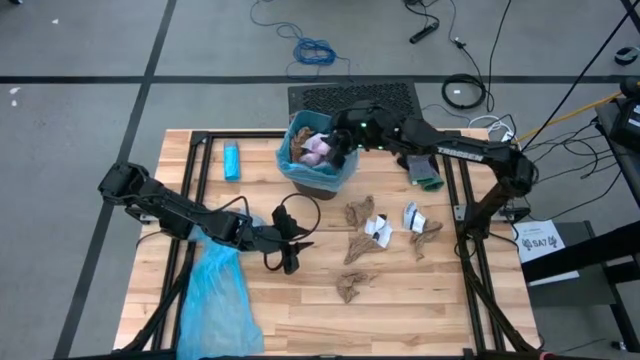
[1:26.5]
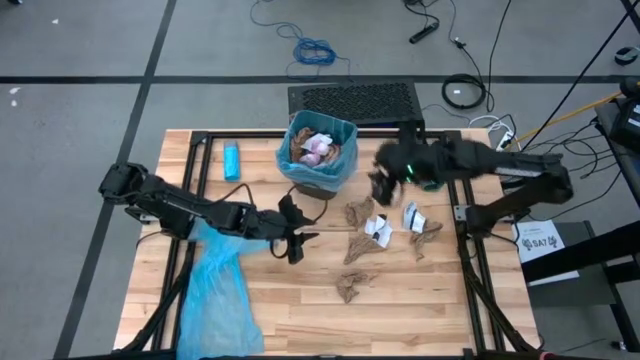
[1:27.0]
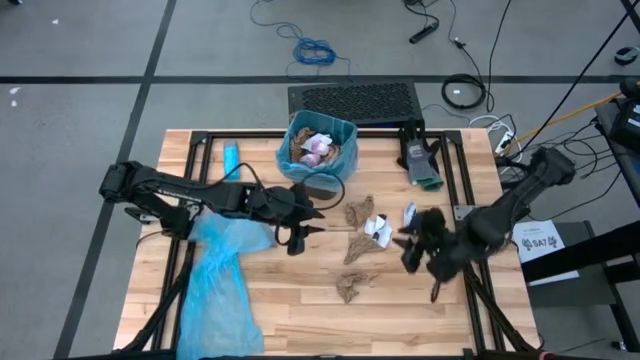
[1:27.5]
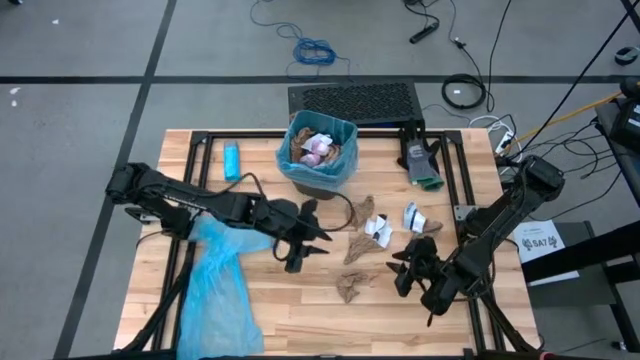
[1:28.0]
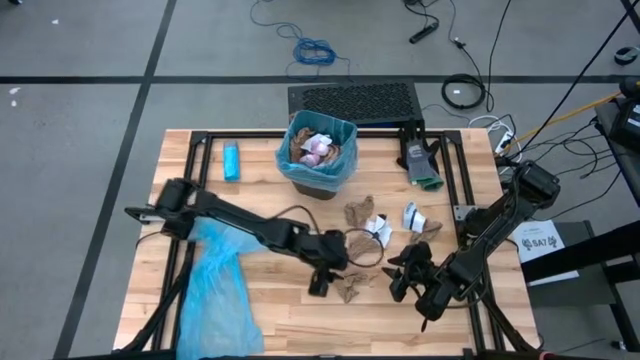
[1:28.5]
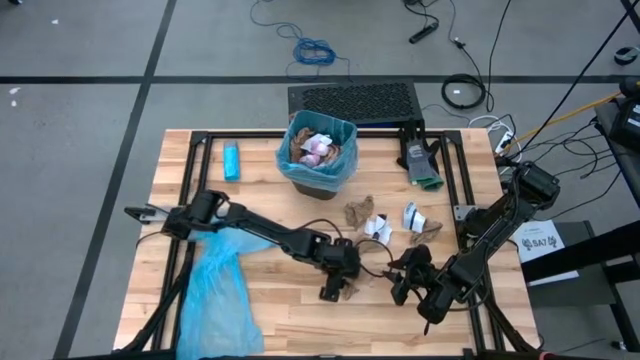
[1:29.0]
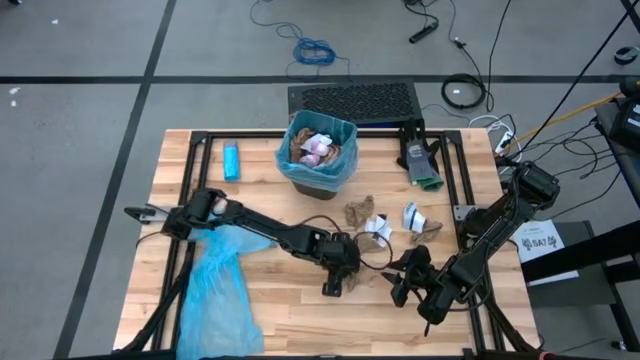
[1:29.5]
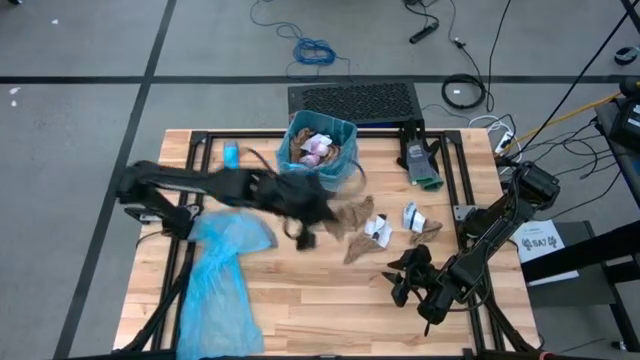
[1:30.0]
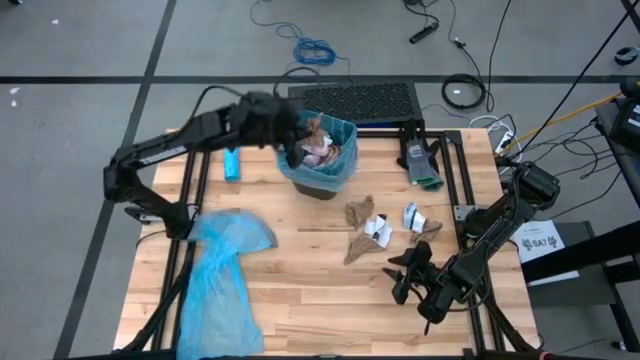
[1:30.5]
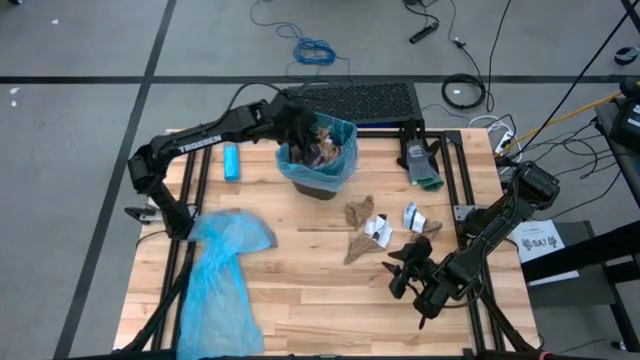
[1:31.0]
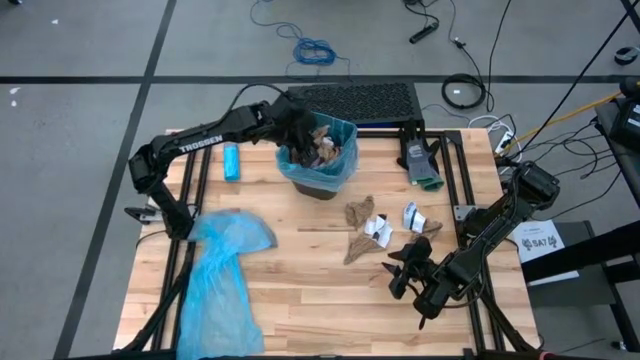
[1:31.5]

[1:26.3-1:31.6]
Task: place trash/remove bag and relplace
Put the brown paper into the trash bin

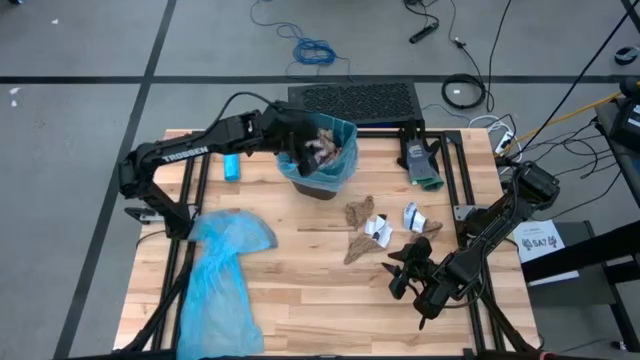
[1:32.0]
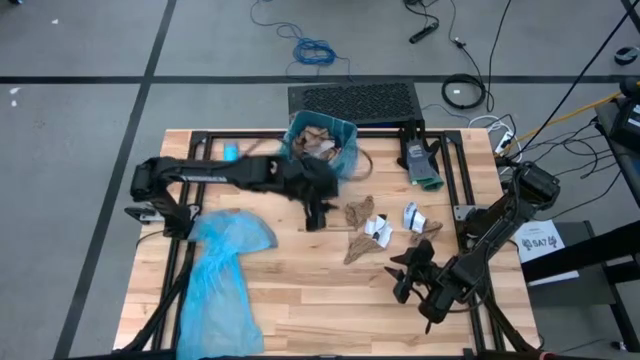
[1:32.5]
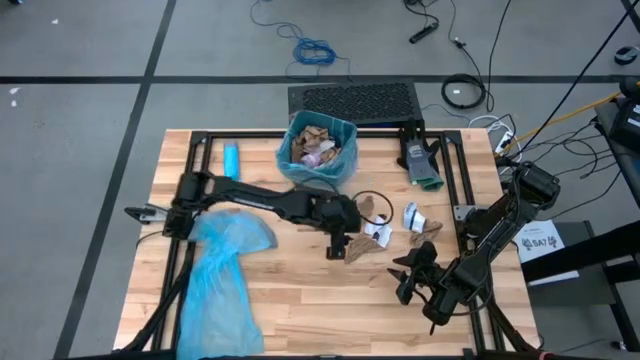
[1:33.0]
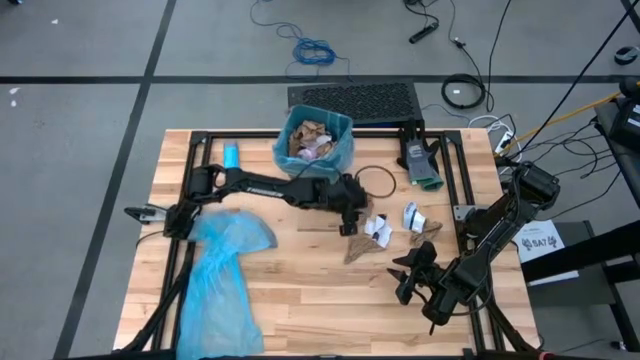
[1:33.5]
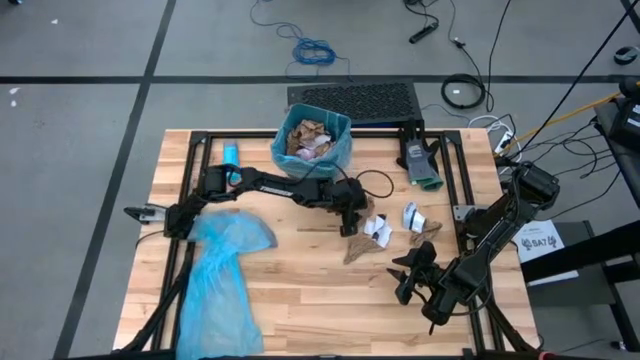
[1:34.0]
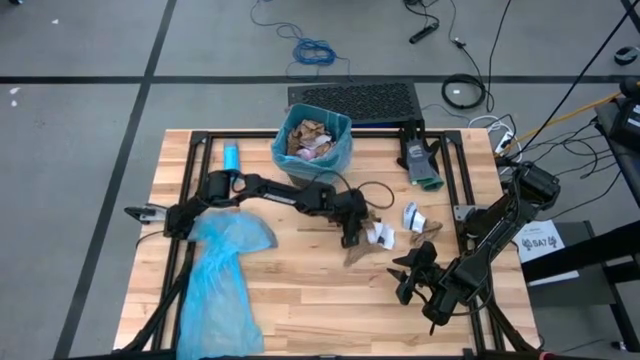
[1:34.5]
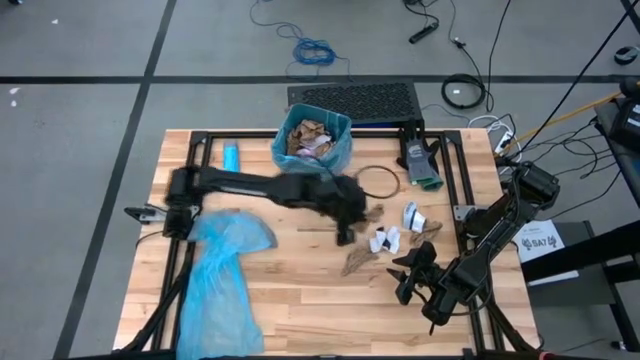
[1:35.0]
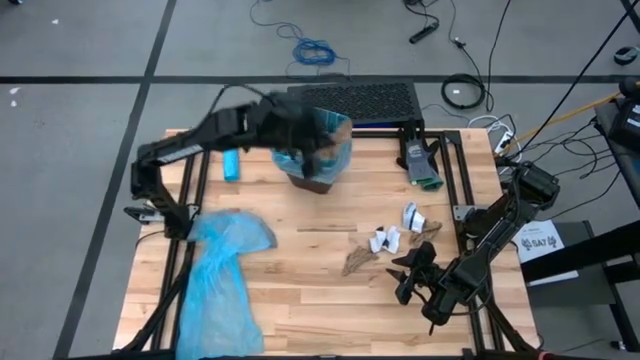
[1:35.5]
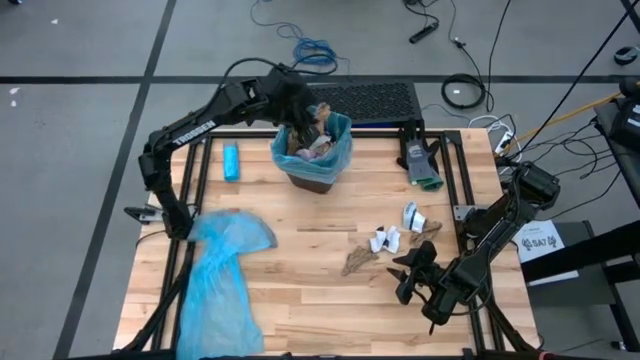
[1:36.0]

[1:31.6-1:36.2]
Put the brown paper into the trash bin

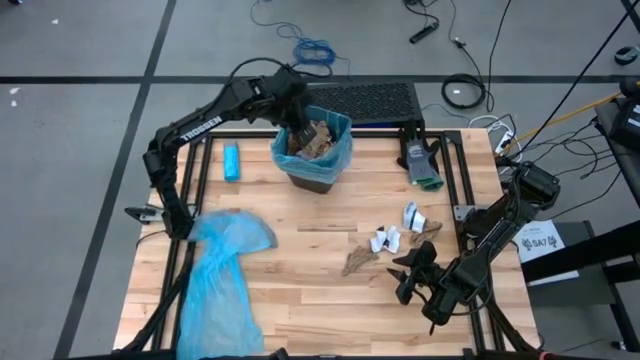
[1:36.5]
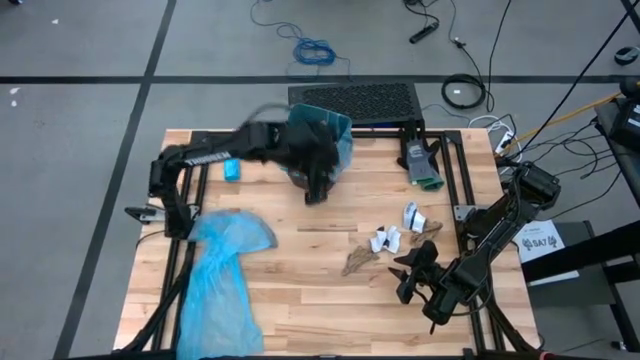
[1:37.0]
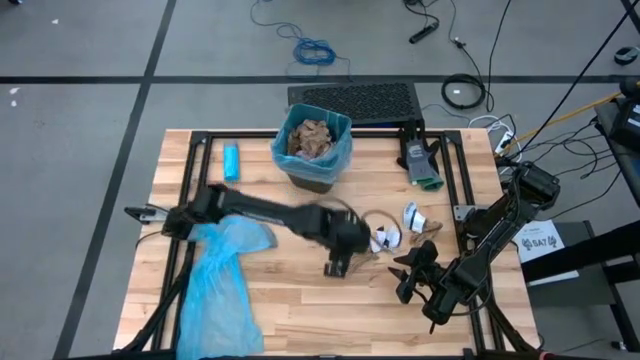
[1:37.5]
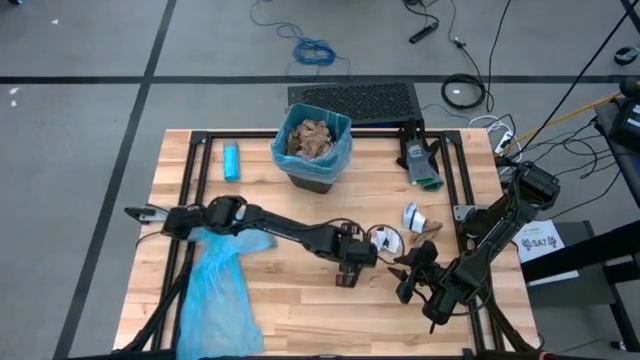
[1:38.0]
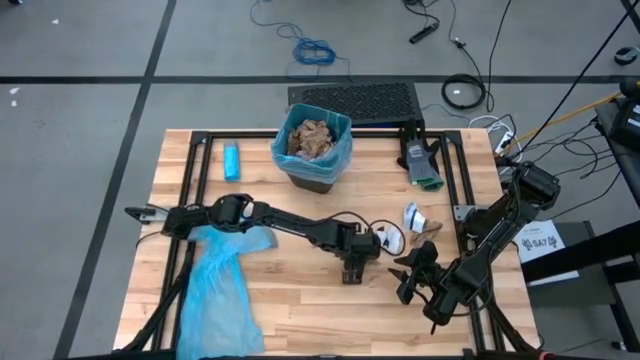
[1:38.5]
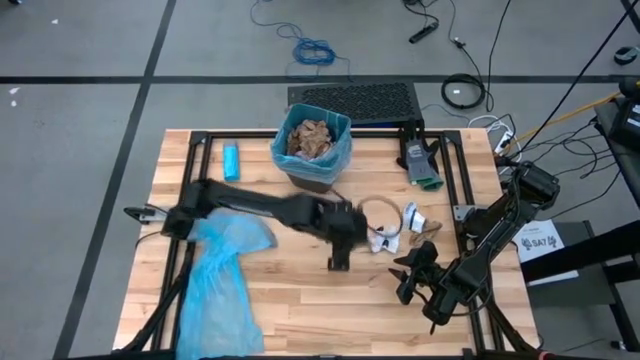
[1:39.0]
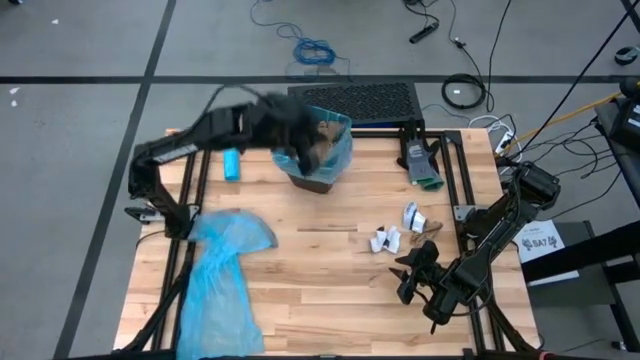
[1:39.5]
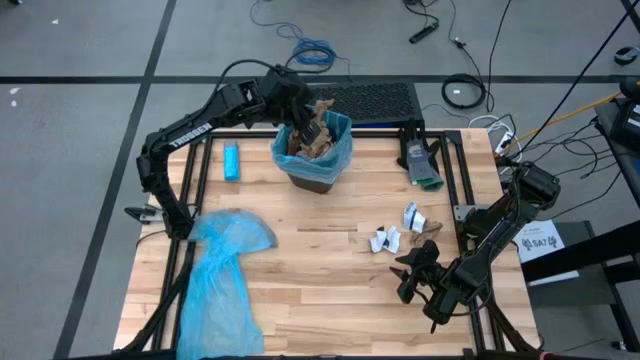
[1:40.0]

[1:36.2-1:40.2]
Put the brown paper into the trash bin

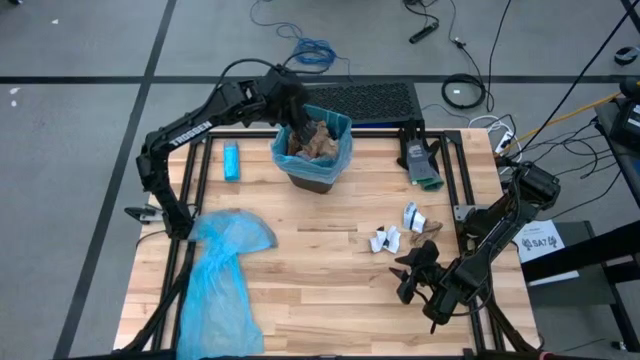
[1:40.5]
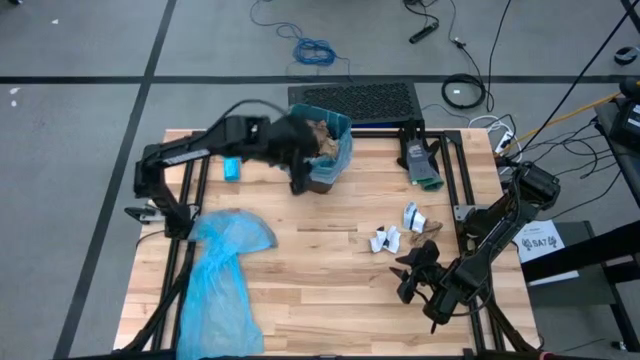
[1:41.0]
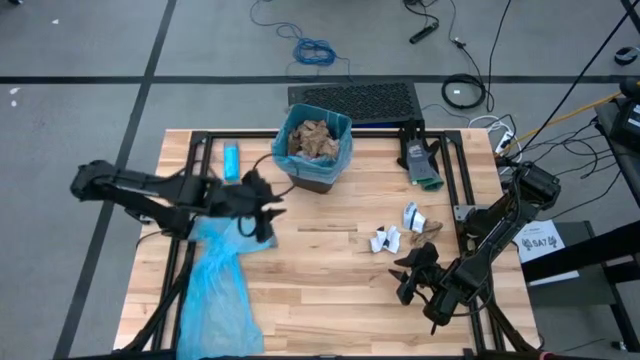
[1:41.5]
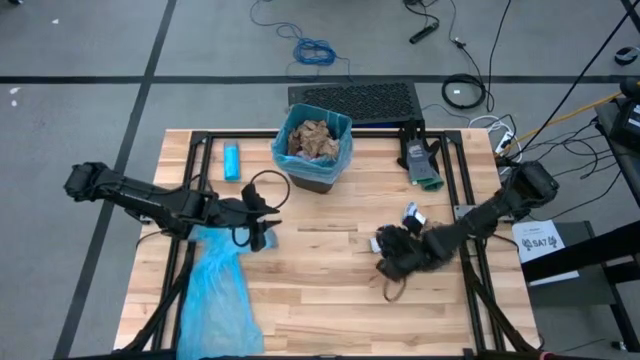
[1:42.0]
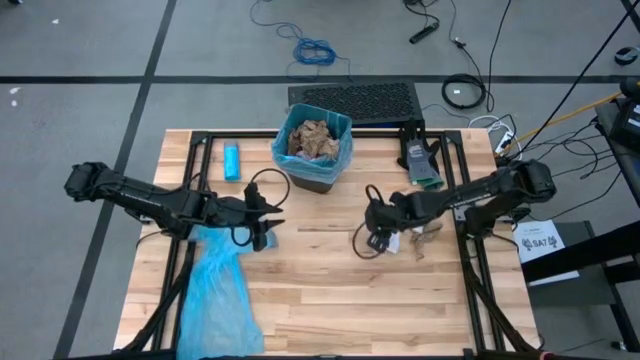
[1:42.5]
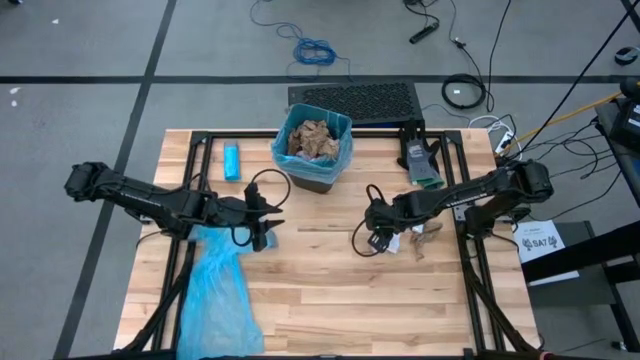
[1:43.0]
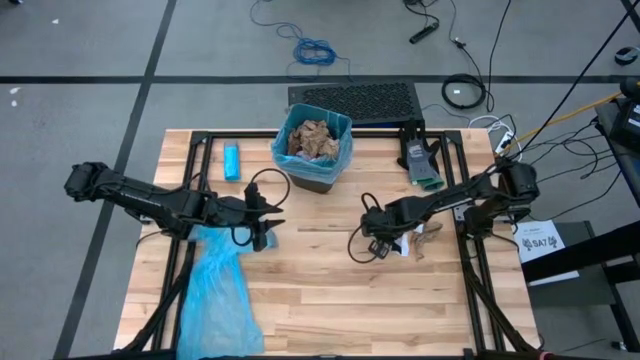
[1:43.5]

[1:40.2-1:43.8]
Put the white paper into the trash bin

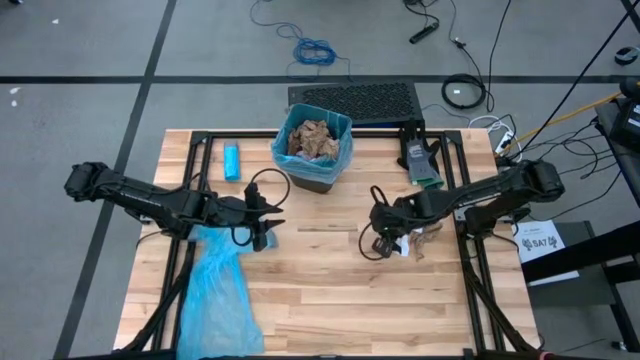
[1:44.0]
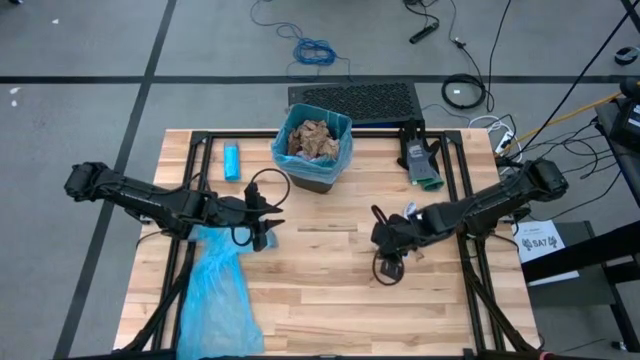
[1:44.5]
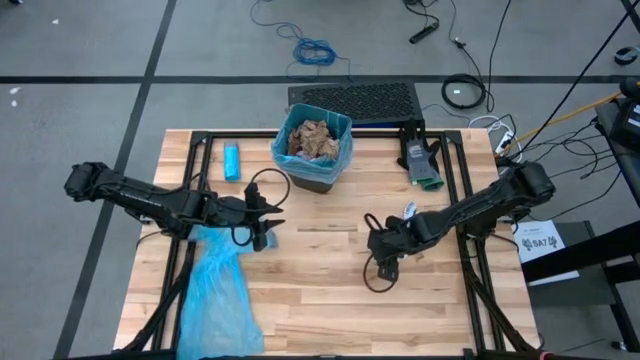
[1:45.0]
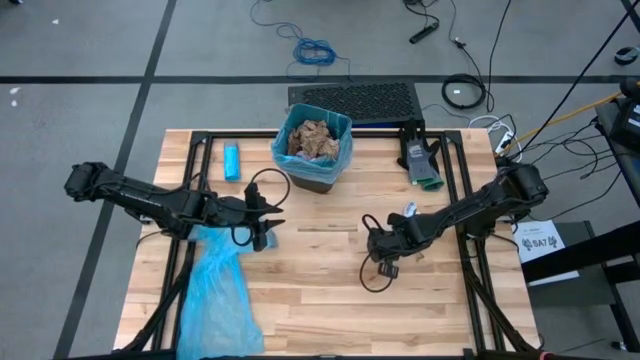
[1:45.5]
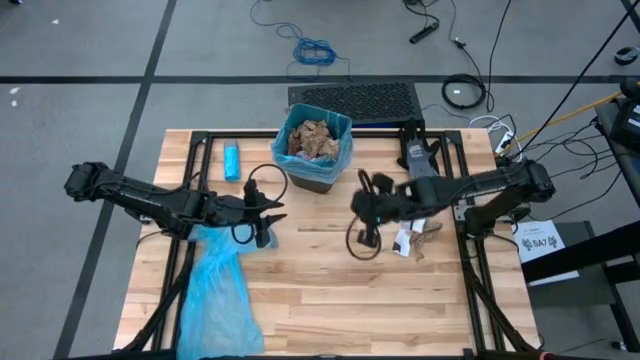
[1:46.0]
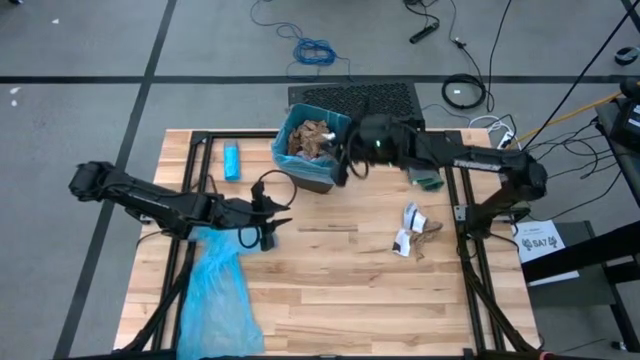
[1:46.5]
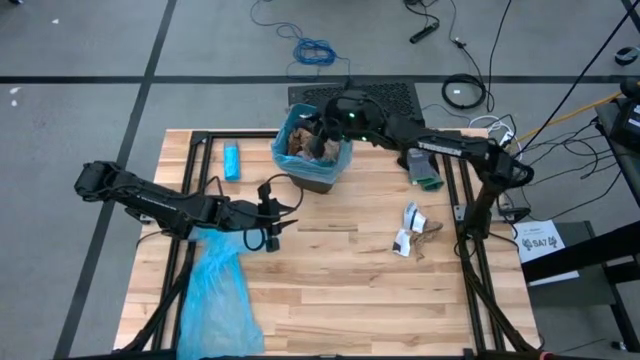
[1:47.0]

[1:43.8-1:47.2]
Put the white paper into the trash bin
